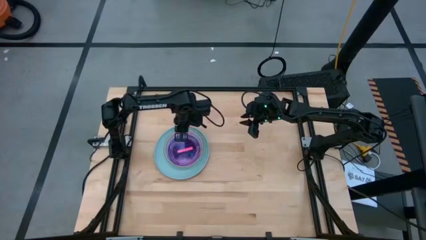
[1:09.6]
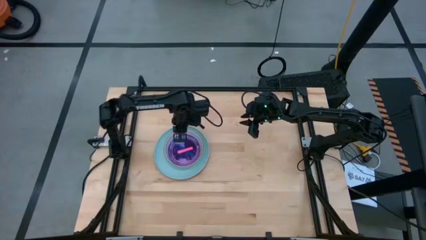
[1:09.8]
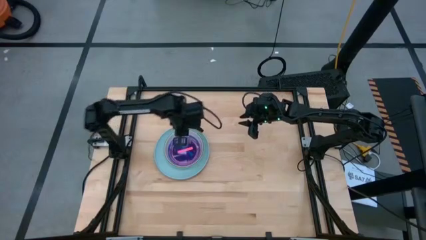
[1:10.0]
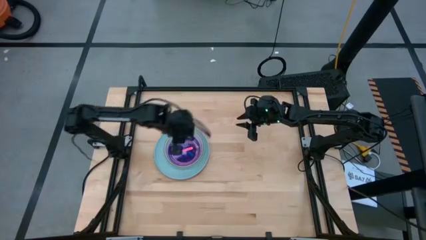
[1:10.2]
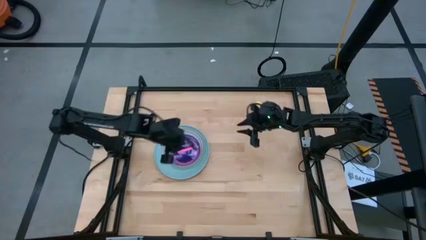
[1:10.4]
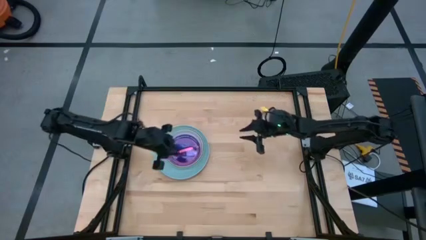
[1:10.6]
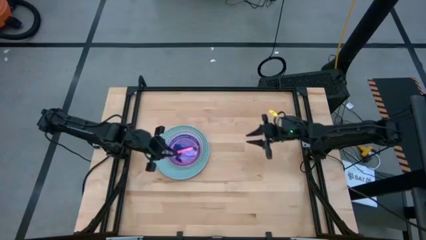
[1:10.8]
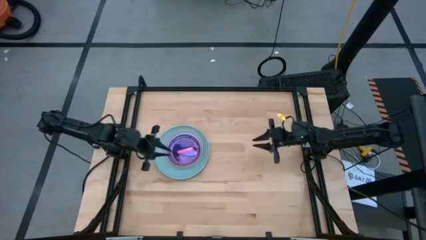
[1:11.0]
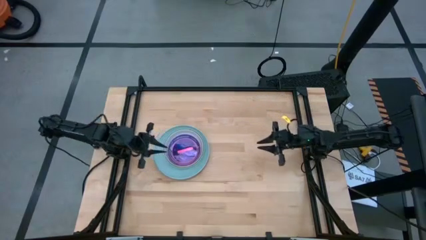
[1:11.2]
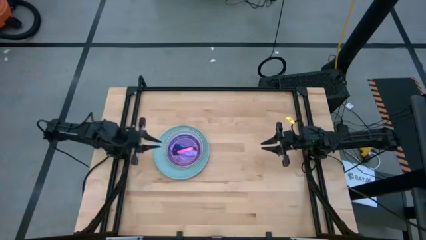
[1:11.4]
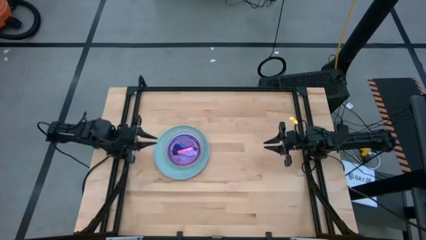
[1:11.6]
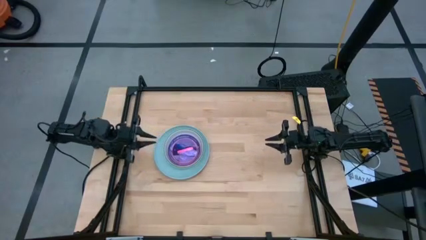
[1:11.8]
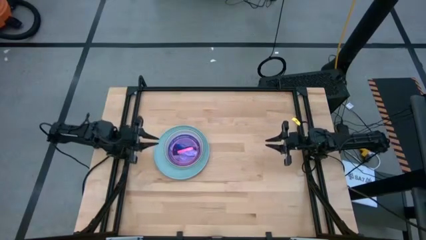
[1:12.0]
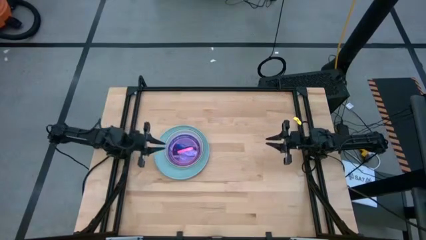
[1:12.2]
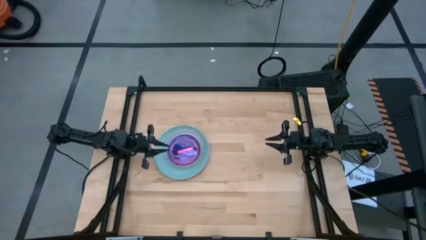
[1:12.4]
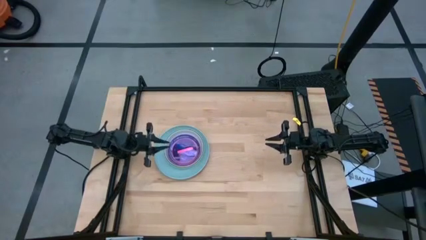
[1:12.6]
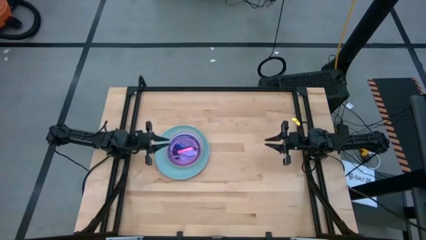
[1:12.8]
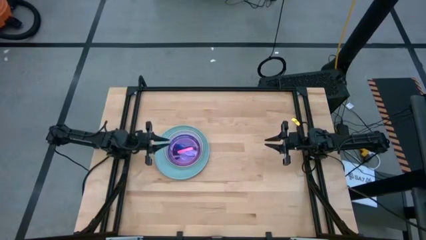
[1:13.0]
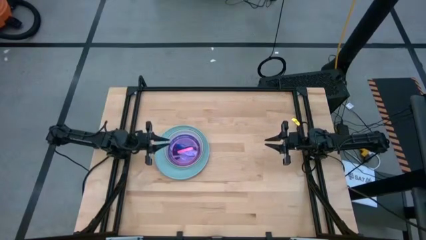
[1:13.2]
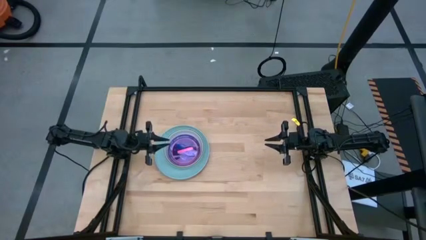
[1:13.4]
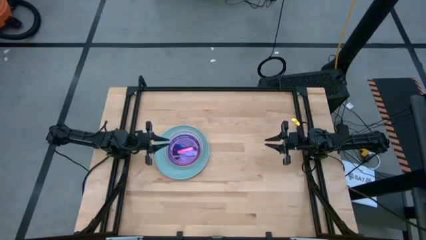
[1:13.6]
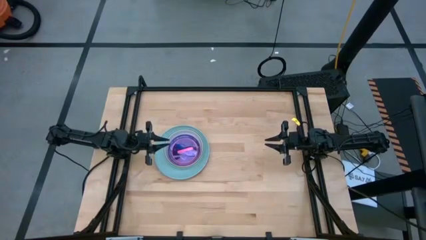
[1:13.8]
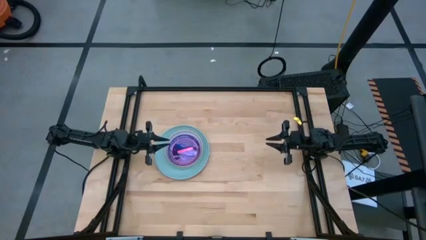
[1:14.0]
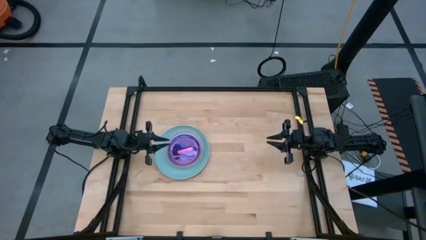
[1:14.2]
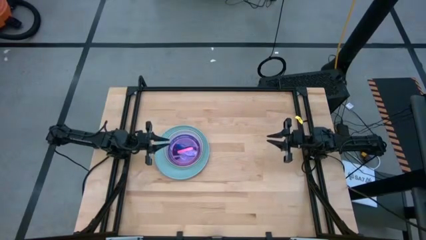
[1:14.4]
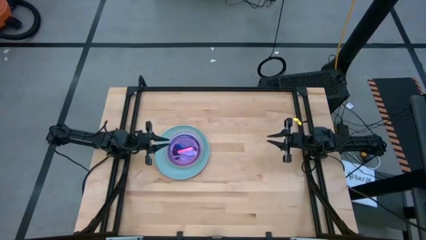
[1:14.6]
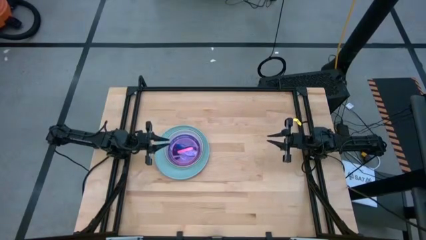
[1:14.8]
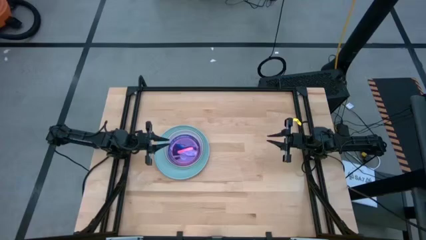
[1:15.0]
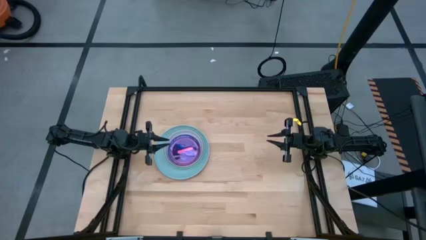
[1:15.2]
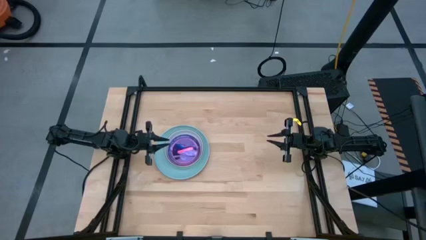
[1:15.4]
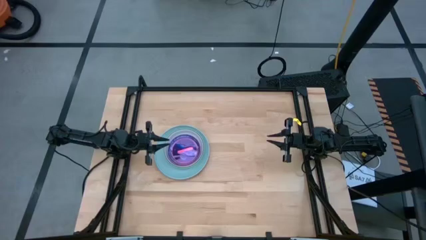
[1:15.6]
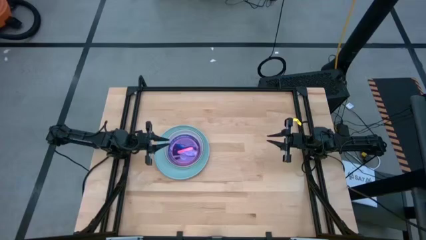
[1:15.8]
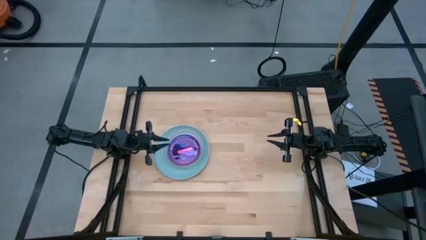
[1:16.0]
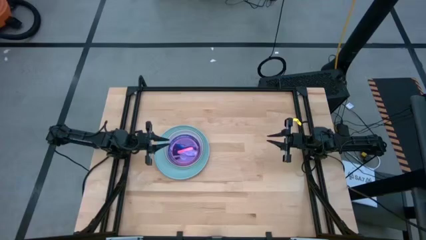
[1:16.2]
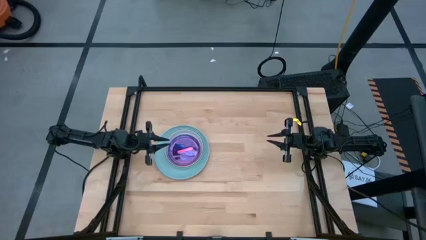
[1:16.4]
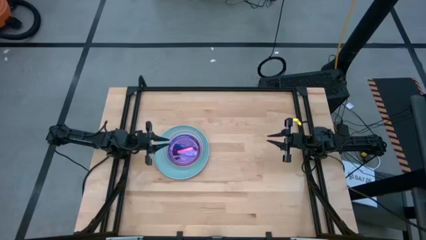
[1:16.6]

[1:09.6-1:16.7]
Task: Stack plastic plates
Return to home position
